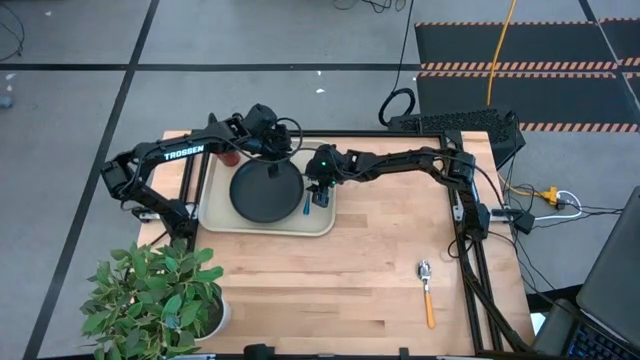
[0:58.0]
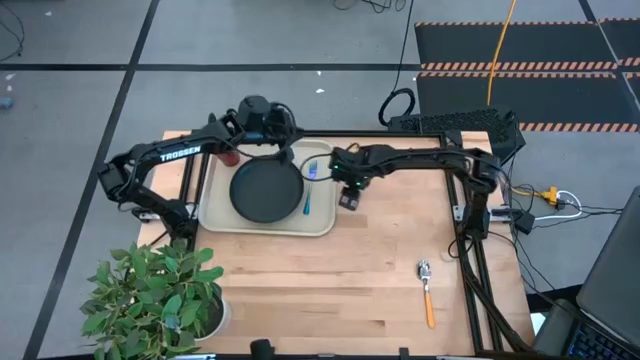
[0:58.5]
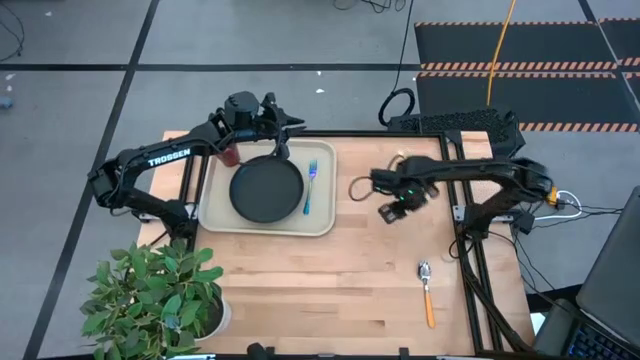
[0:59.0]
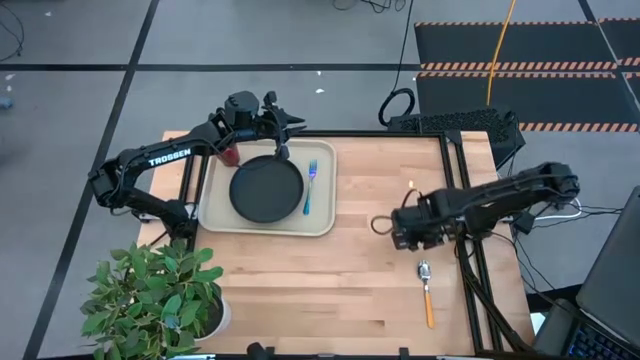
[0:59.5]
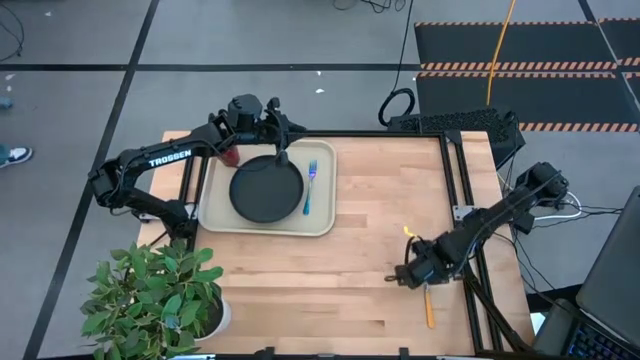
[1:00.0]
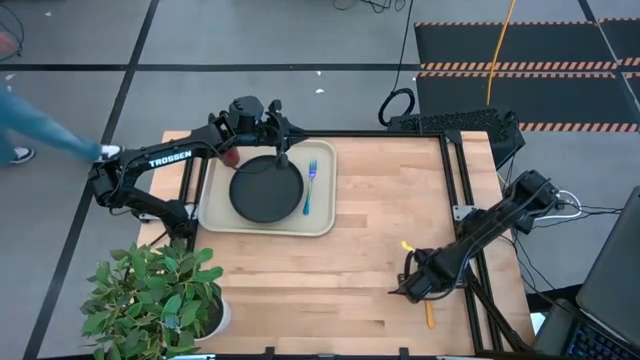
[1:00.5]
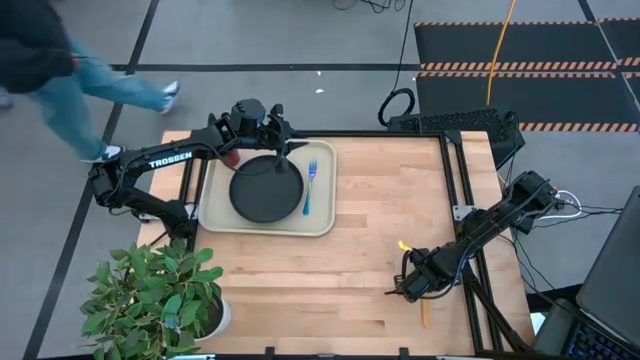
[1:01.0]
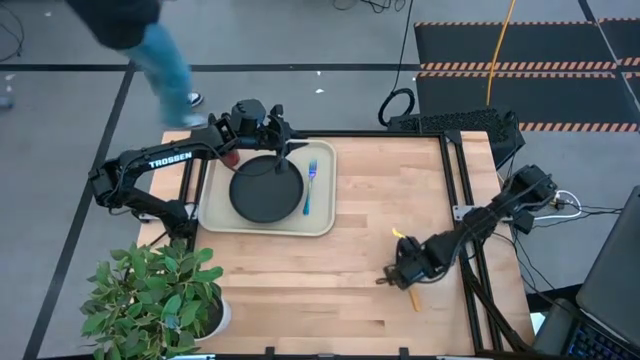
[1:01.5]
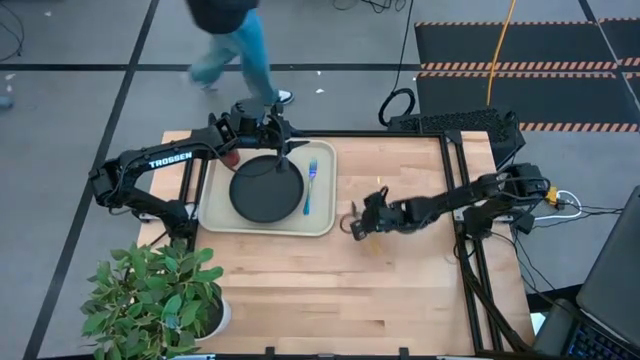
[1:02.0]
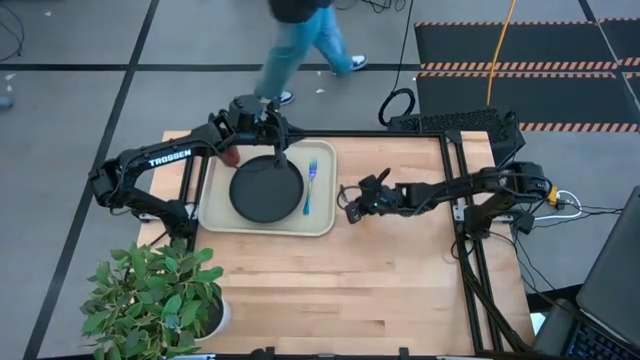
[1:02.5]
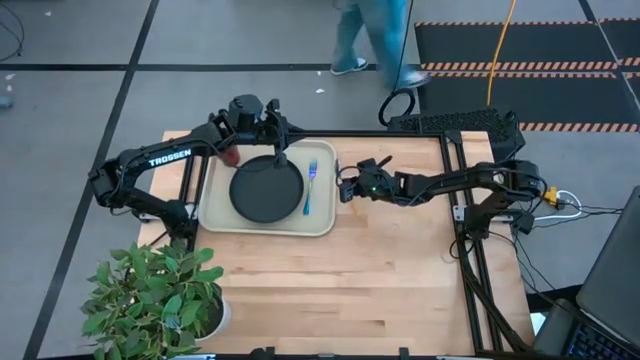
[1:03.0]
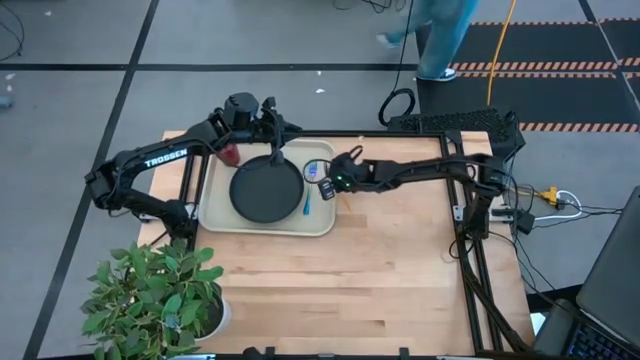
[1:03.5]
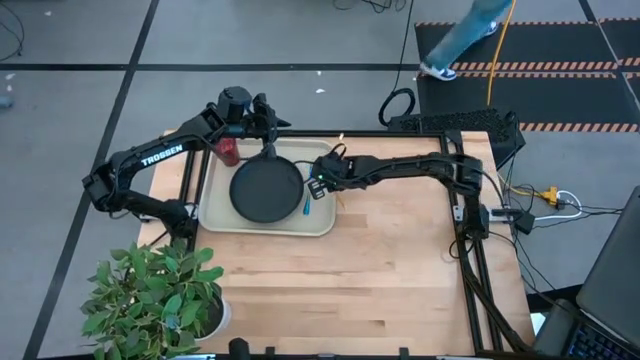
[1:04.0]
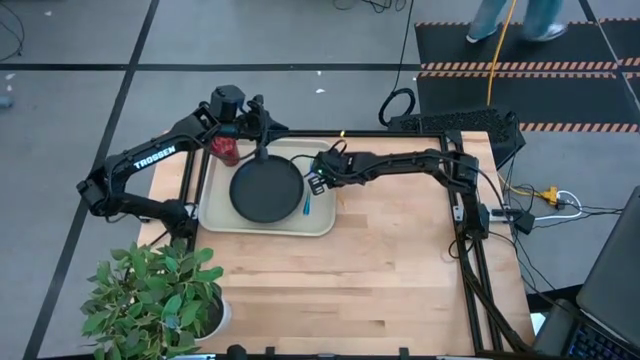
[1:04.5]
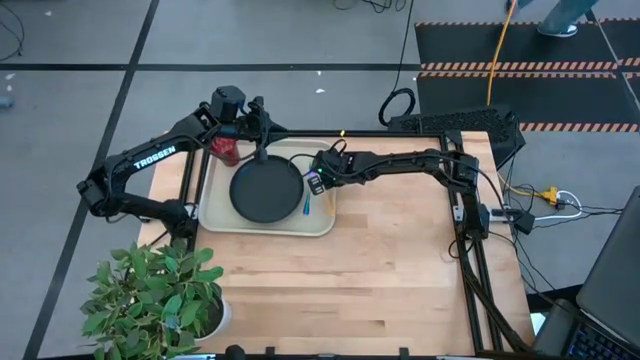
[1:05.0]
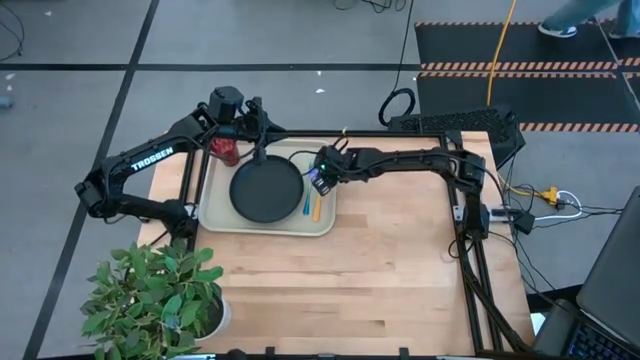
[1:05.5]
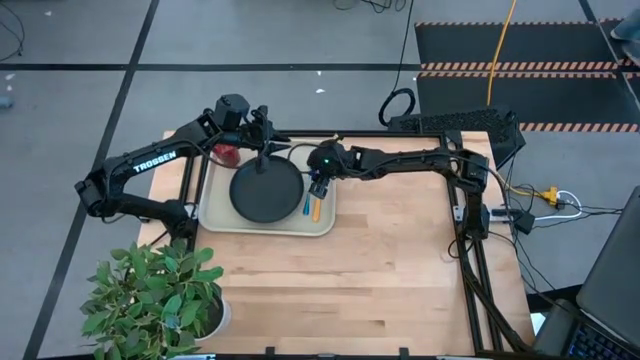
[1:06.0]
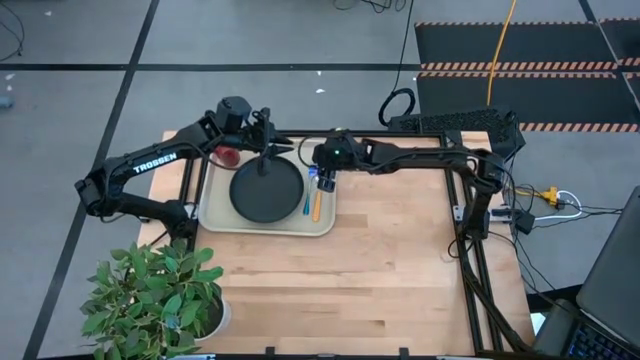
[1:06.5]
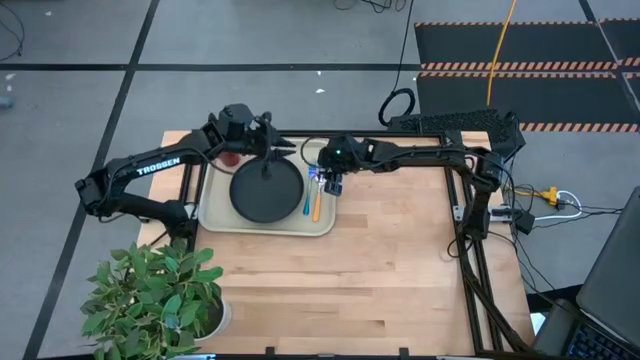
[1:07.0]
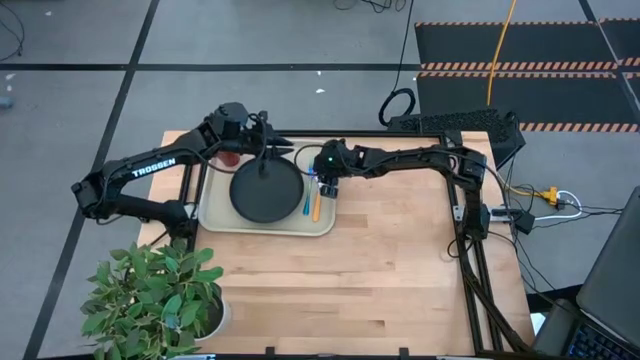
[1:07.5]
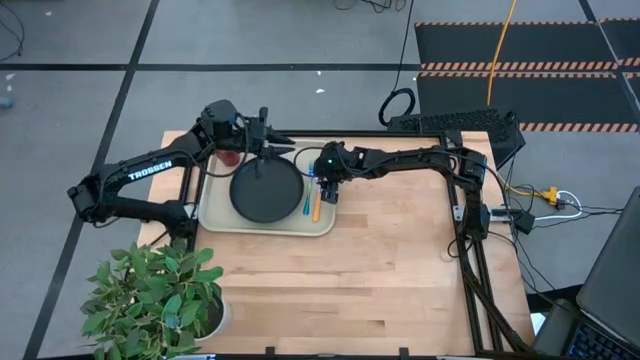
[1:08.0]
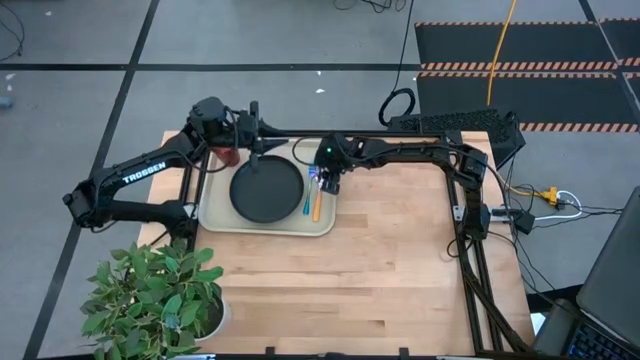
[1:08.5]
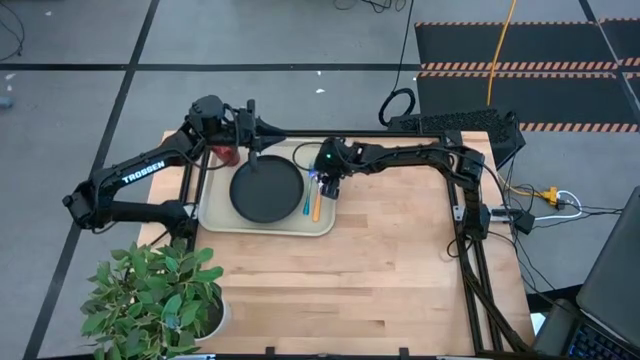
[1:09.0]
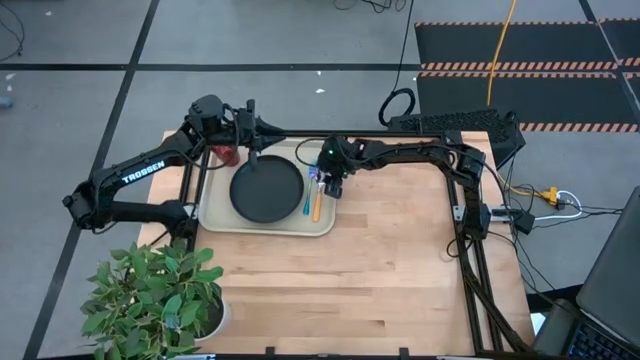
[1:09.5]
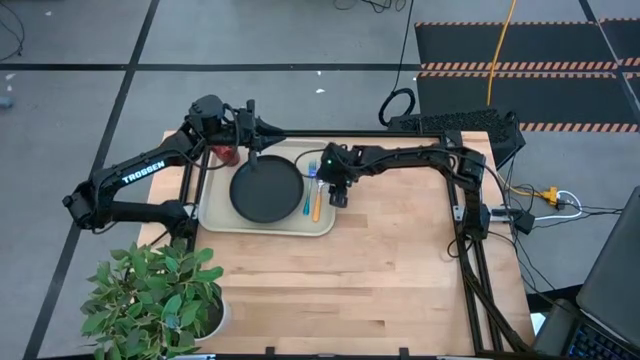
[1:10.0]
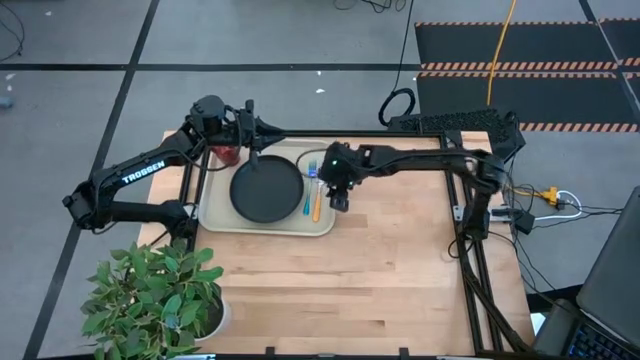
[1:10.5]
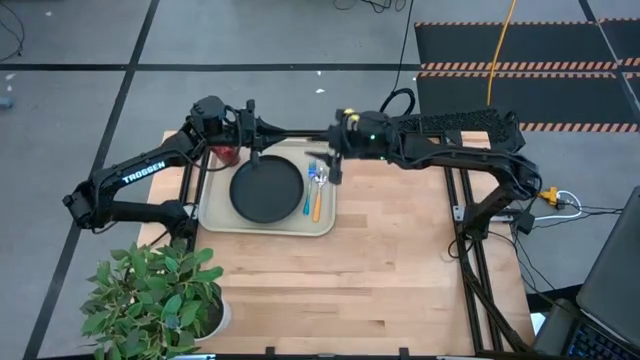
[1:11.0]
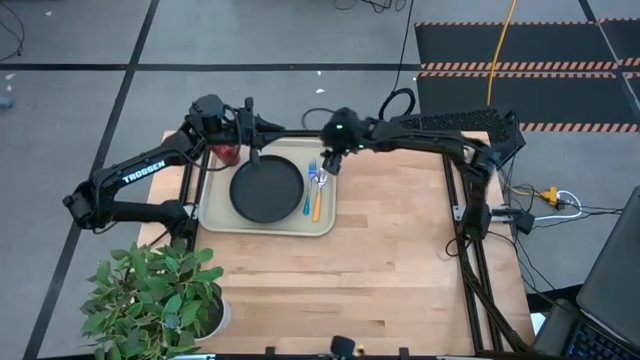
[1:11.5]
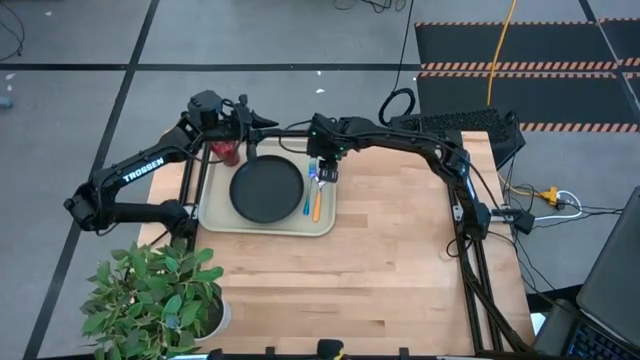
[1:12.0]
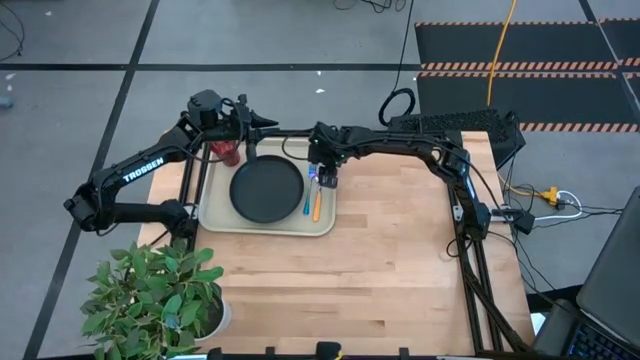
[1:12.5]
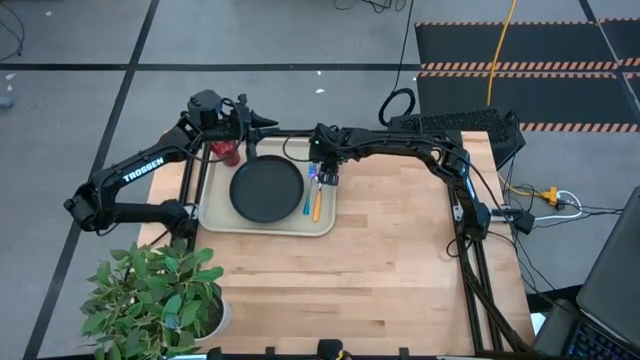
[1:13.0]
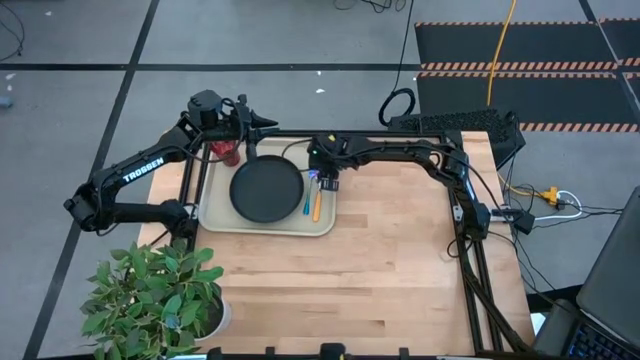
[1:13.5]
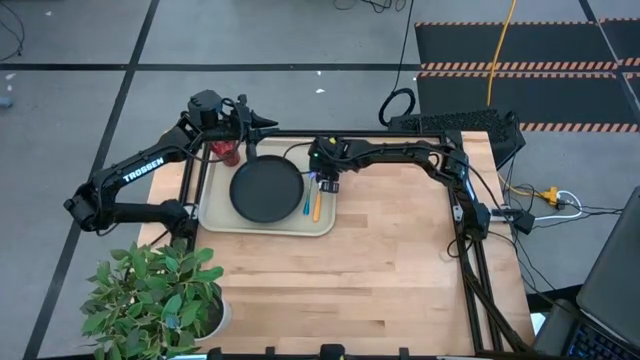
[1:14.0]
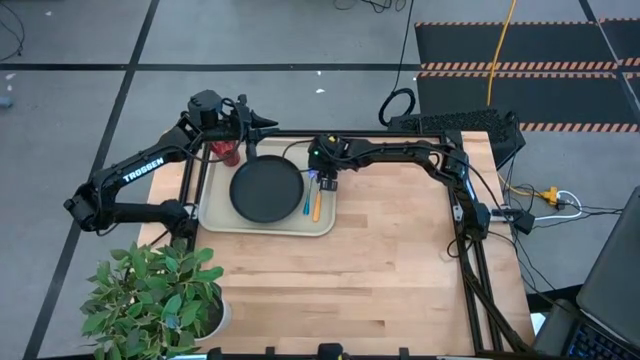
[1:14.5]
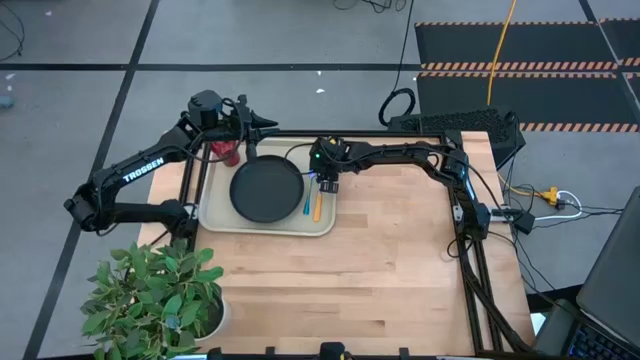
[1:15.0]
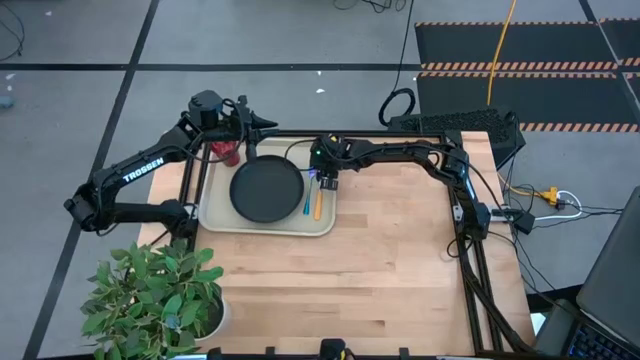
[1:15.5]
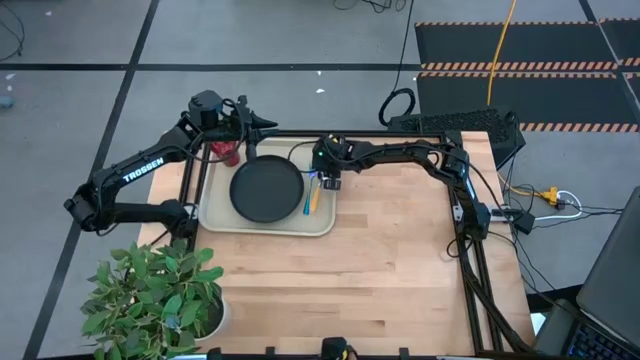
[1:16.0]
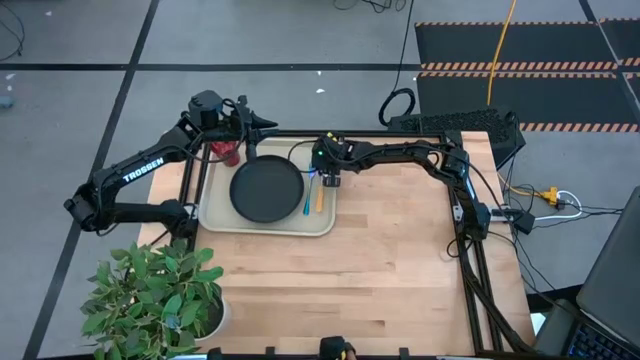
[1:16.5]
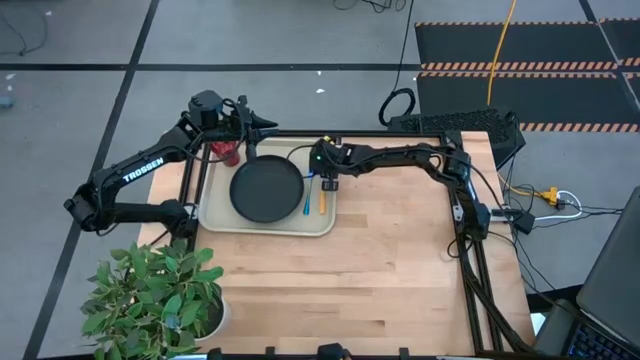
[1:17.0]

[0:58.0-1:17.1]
Task: Pick and place plate/cup/fork/spoon on tray
Put the orange spoon on the right side of the blue fork

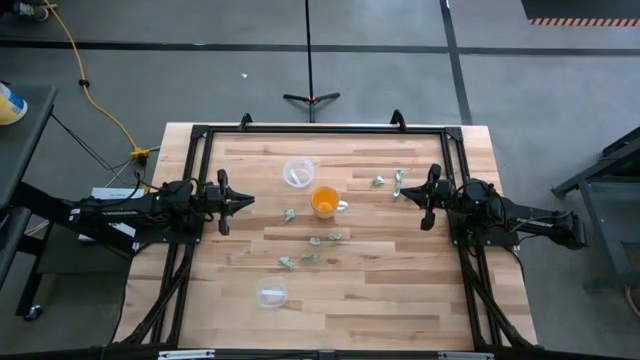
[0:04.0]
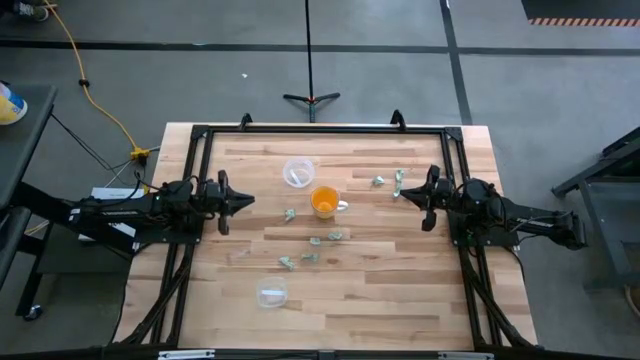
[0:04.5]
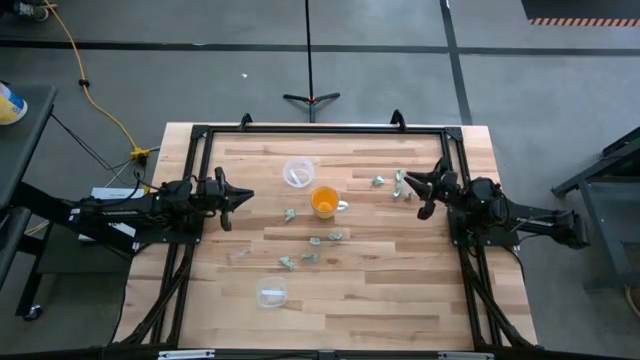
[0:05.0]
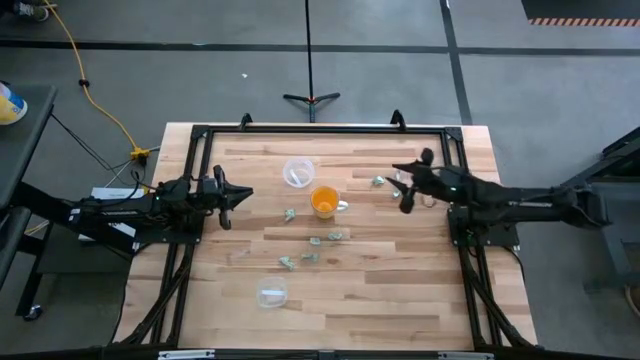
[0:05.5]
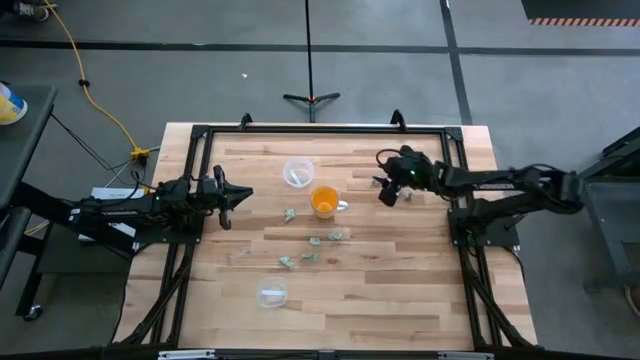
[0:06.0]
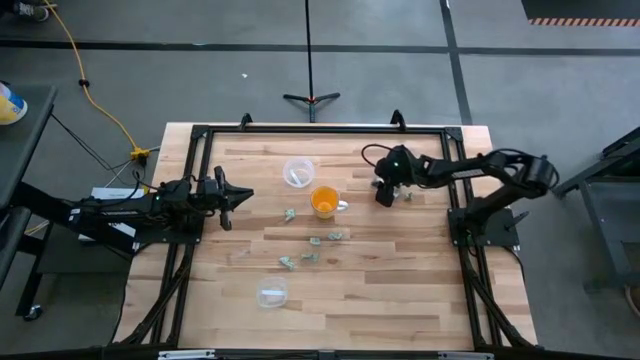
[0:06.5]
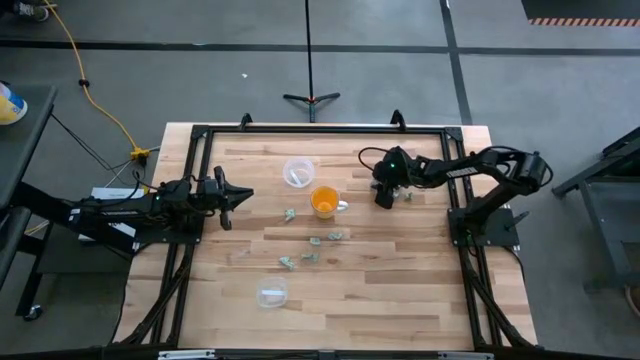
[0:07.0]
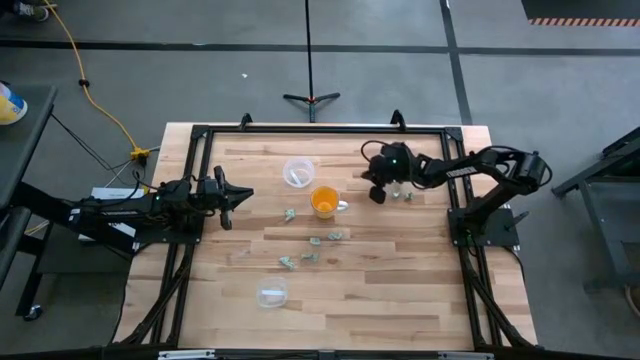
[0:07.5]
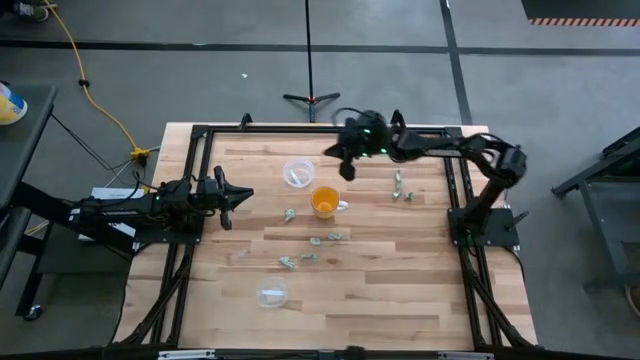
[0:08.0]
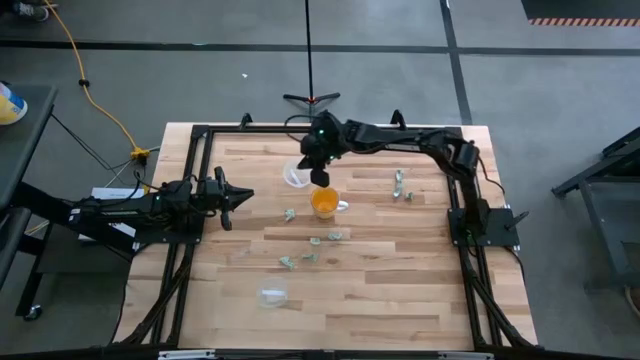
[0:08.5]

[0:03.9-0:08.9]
Task: Pick and place items into bin
Put the light green stevia packet into the top transparent bin
